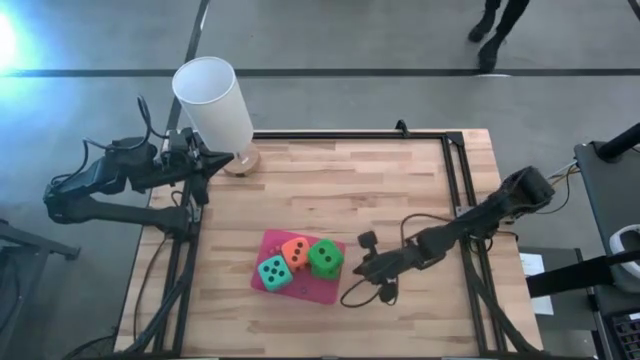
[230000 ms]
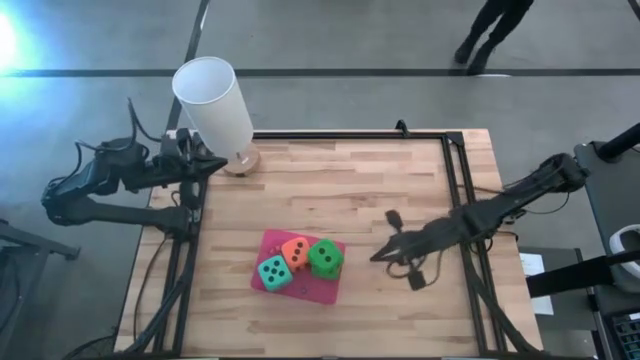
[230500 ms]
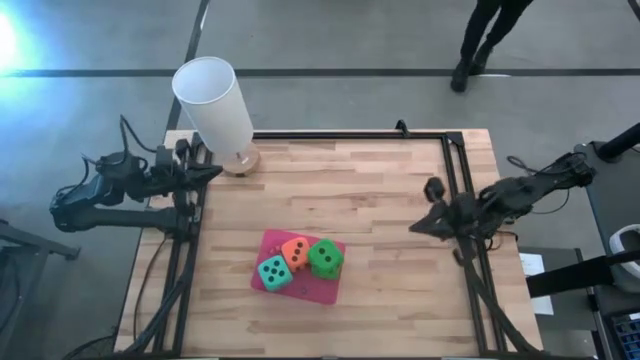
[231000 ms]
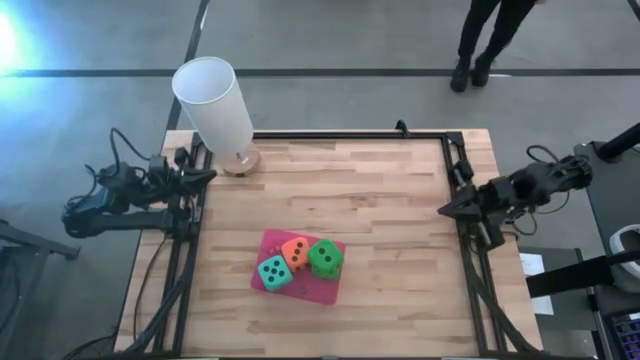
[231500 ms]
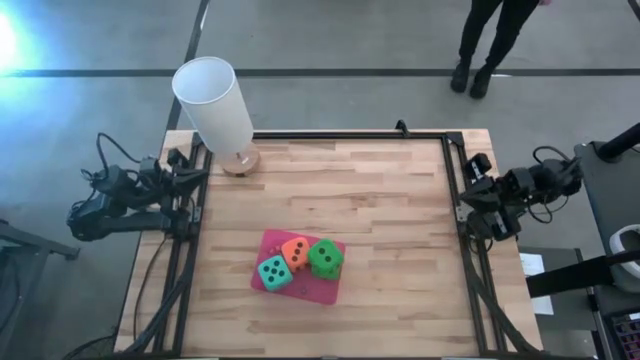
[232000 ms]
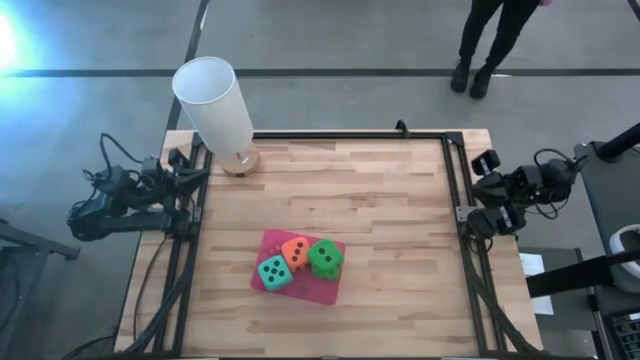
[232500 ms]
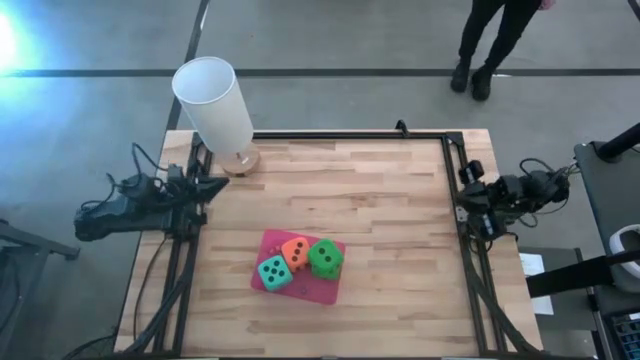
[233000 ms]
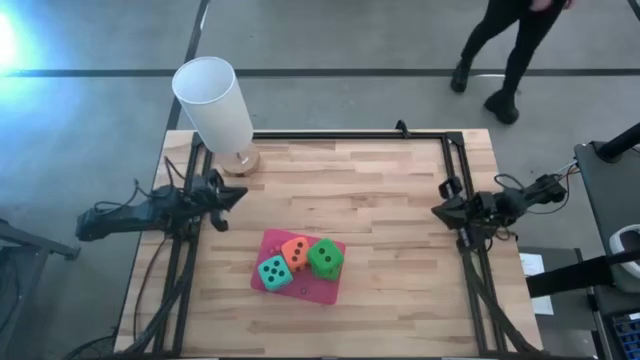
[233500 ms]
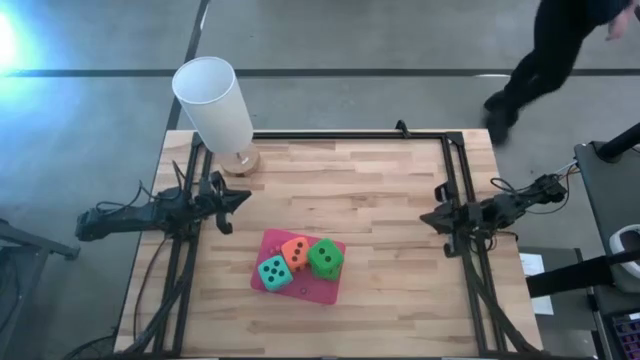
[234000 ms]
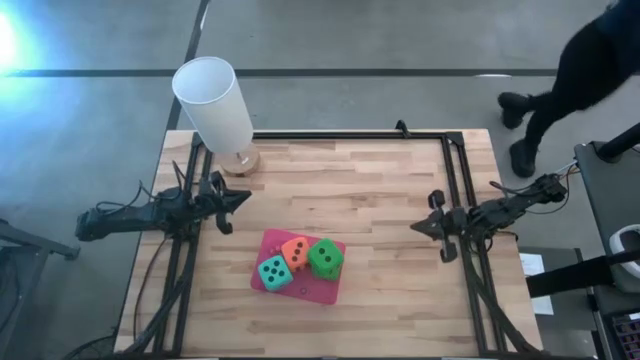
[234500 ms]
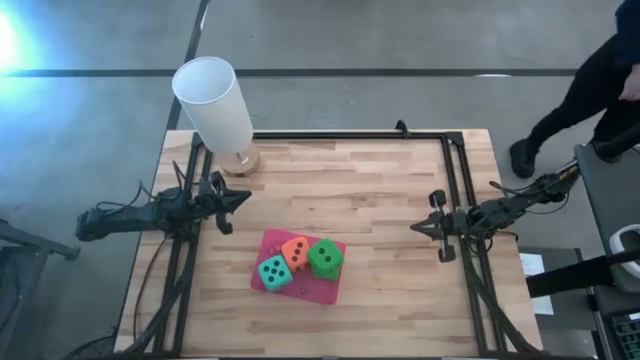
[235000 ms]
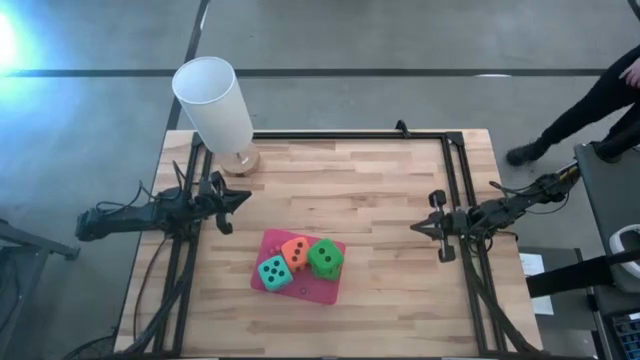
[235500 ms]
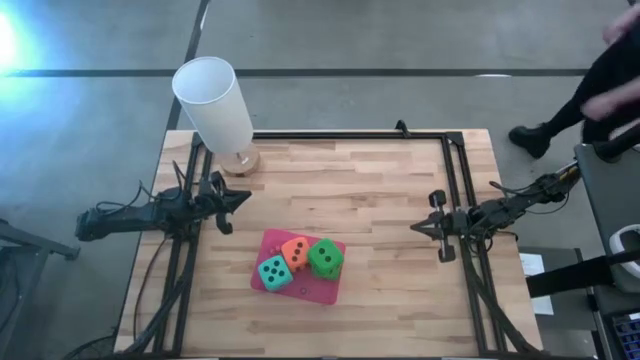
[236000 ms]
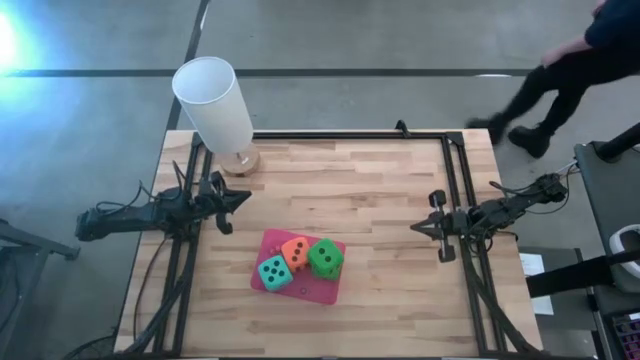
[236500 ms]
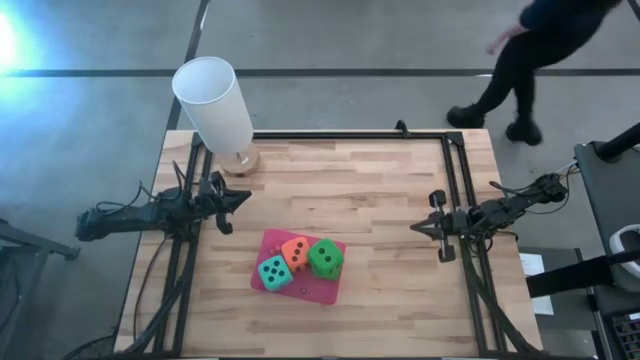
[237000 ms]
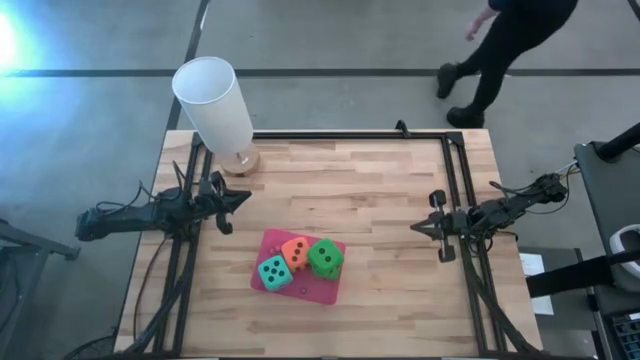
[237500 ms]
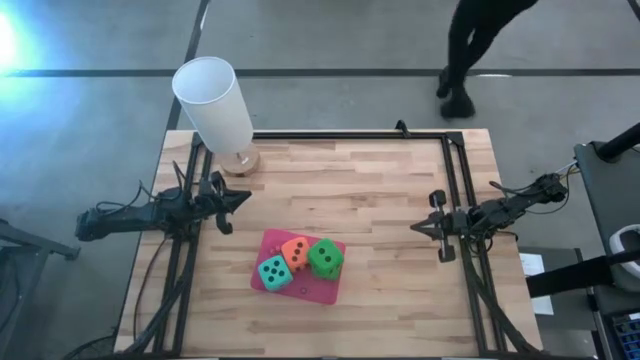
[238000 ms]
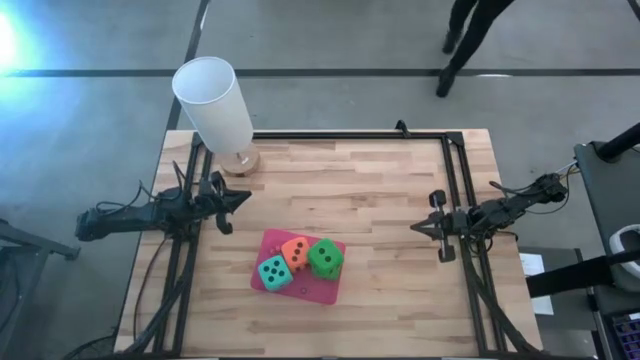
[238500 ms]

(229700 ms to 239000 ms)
Task: Pick & Place Dice
Return to Home Position

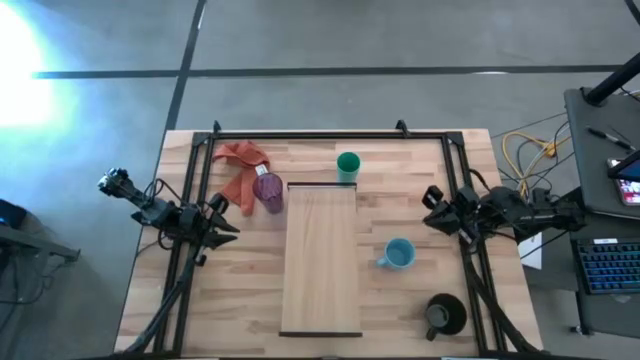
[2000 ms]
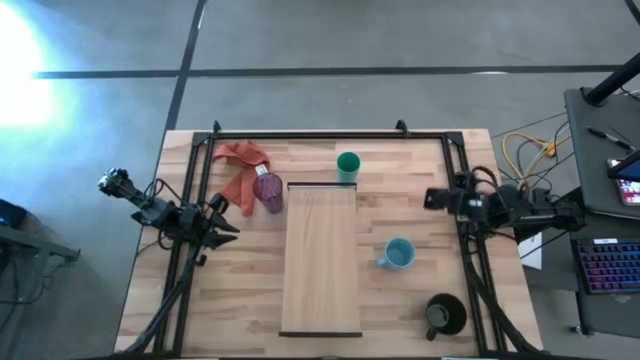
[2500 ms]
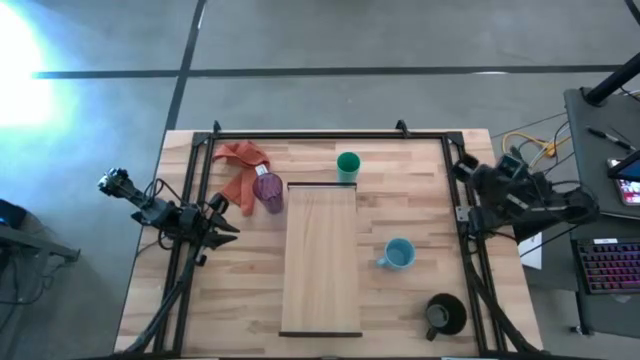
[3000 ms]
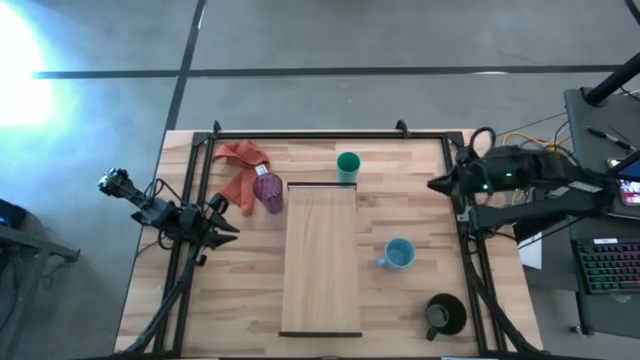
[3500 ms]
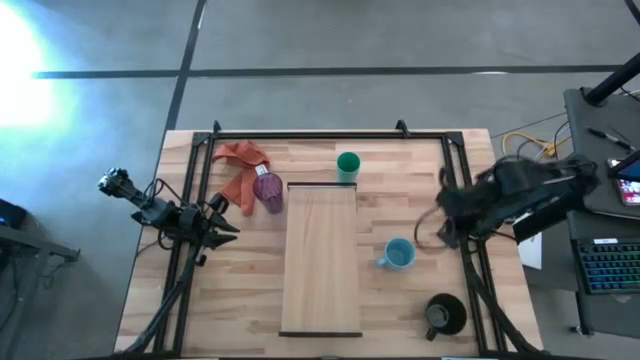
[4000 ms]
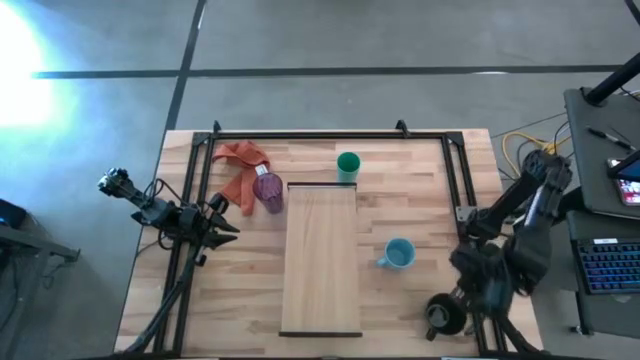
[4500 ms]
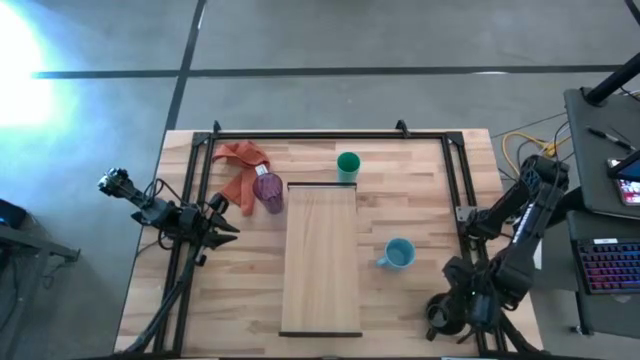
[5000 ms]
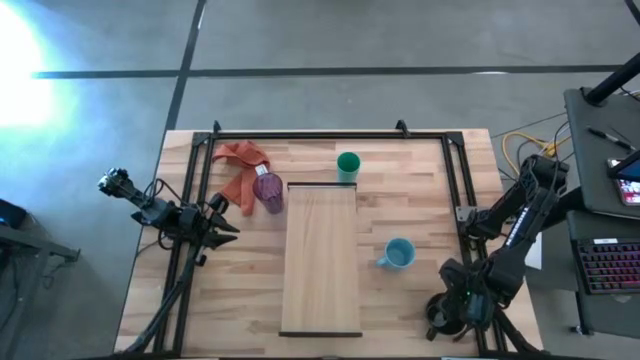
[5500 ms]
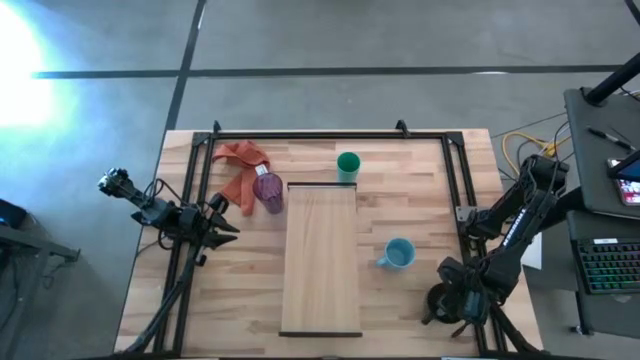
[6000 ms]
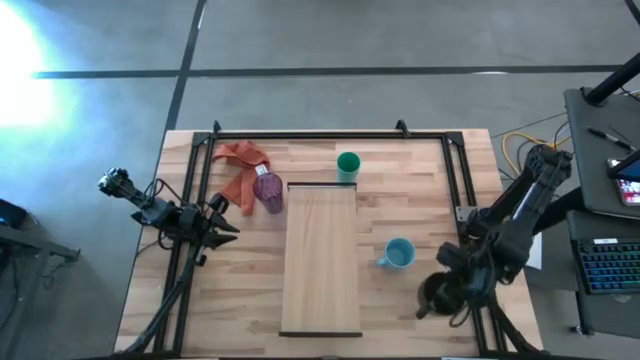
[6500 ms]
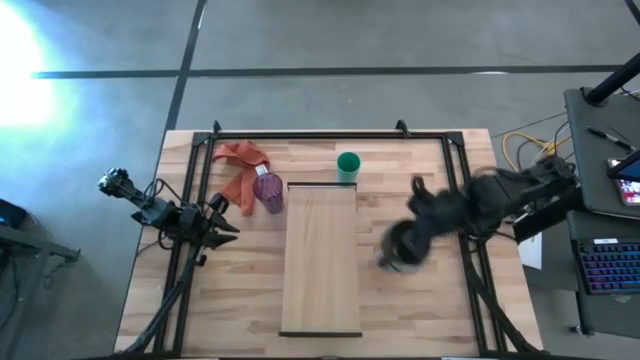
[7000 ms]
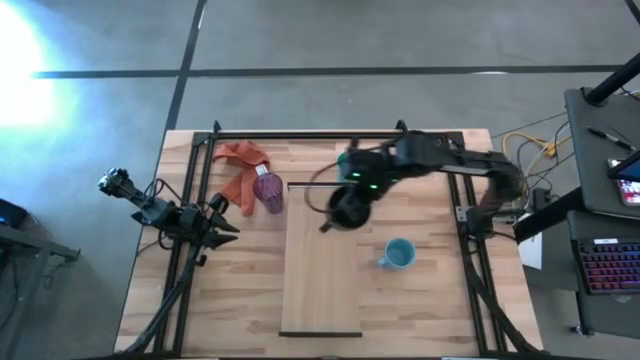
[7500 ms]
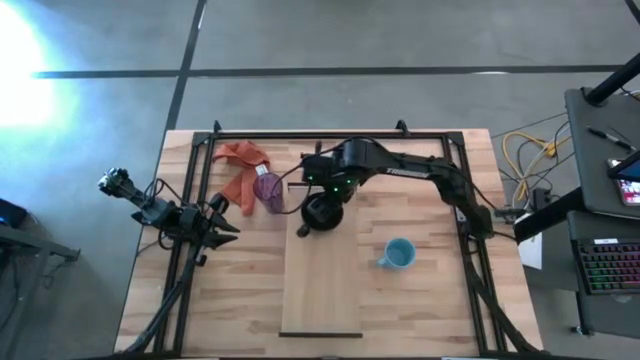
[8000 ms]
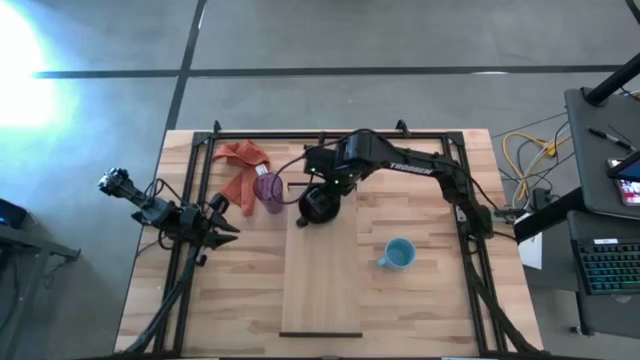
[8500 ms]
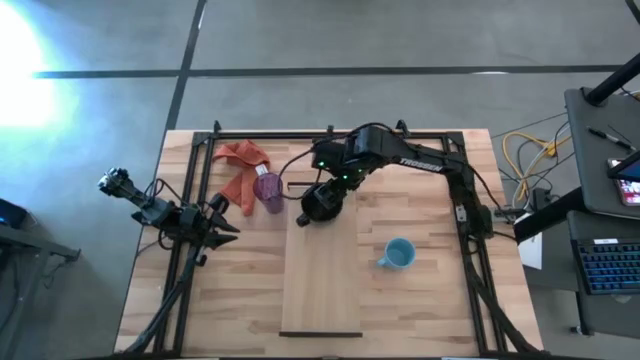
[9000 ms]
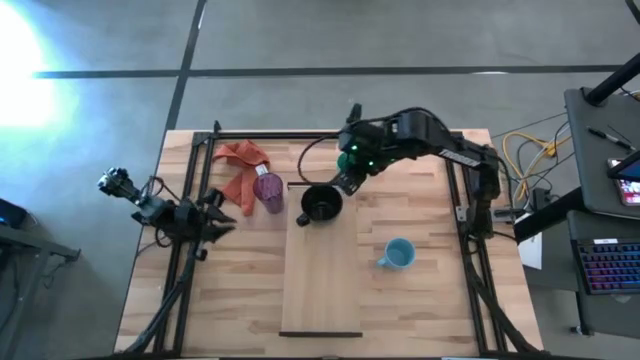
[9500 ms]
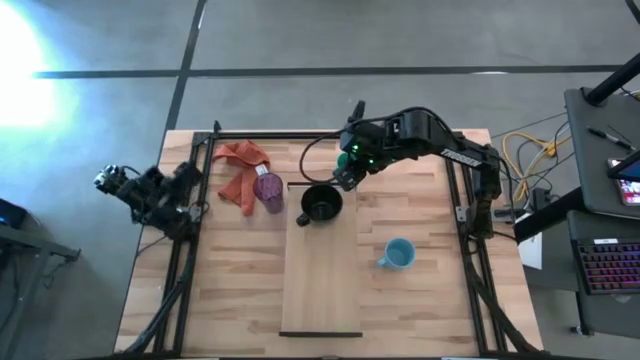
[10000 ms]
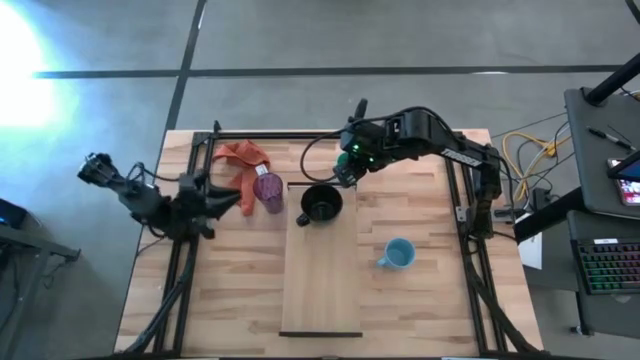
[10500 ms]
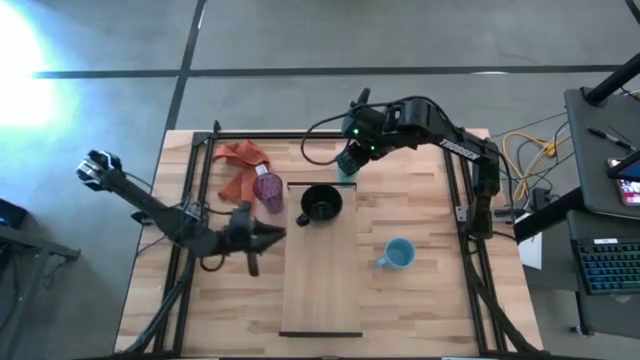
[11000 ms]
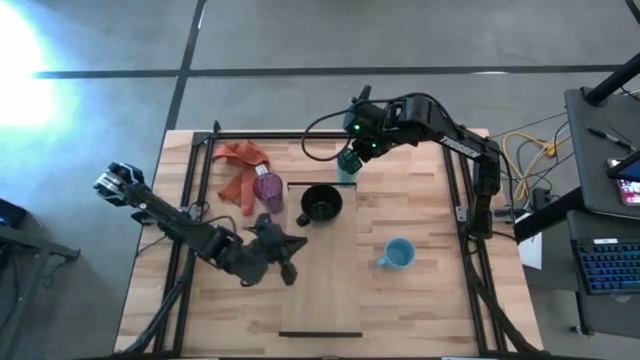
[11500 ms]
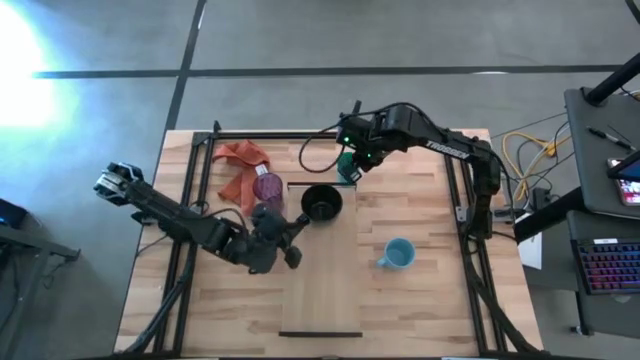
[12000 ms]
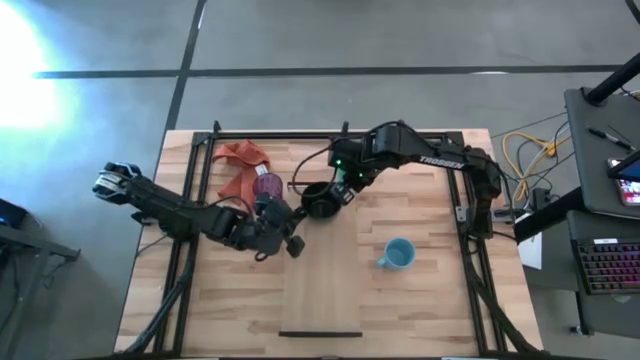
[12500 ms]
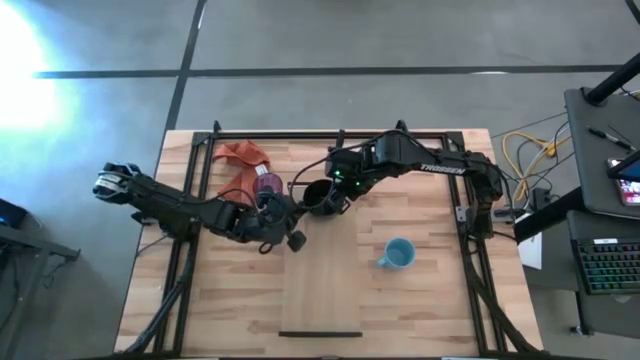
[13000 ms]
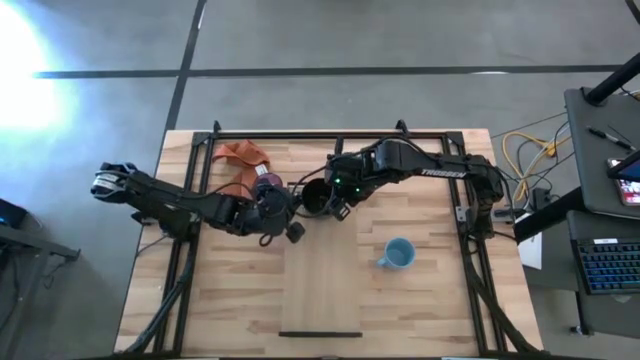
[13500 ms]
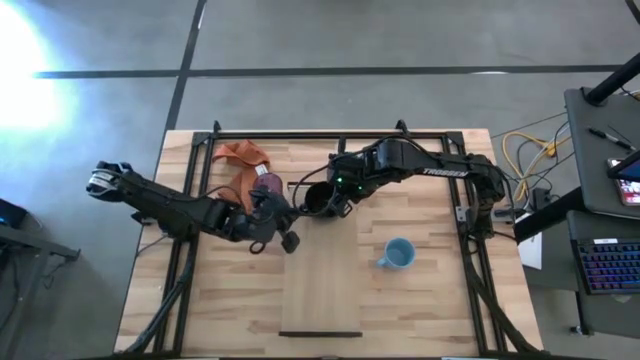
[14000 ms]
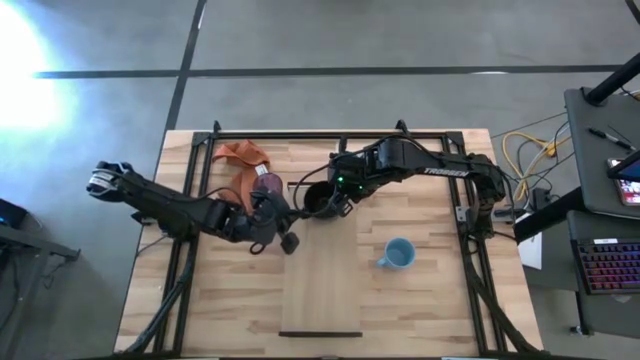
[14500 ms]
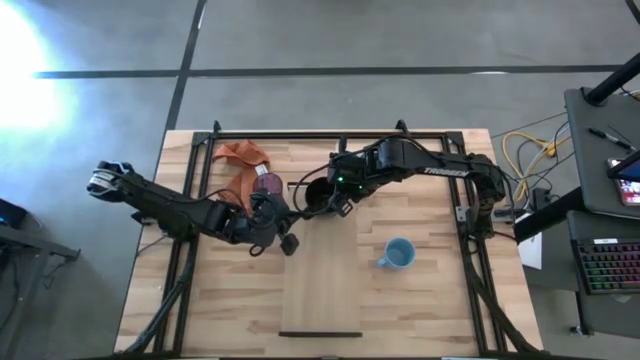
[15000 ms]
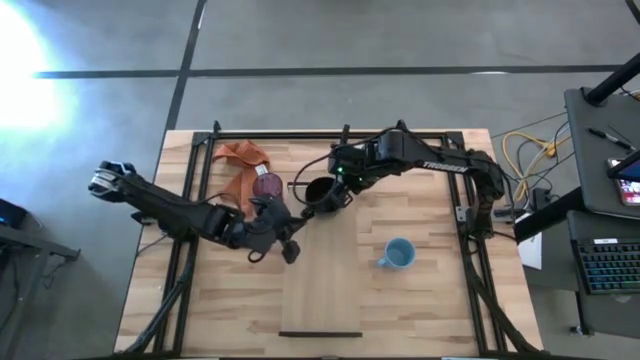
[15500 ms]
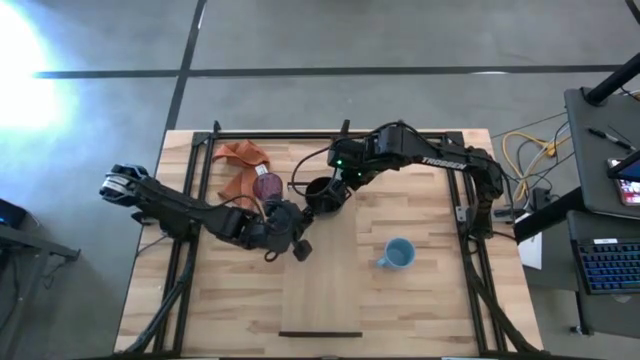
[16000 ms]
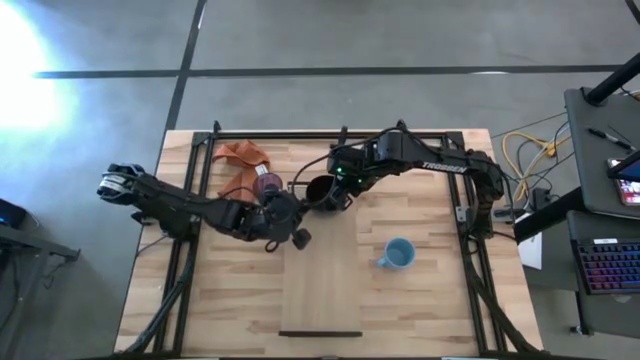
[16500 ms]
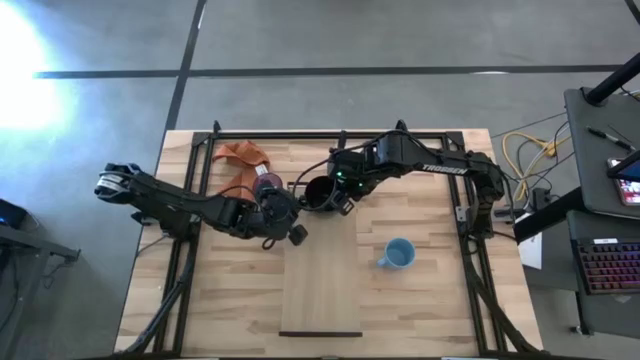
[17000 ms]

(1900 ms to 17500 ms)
Task: Stack small to large cups/mugs on shelf
Put the black cup on the shelf
